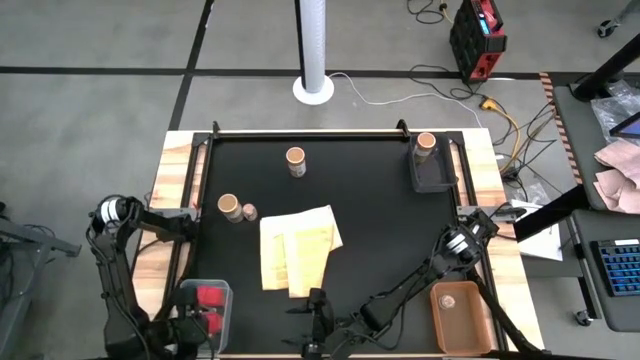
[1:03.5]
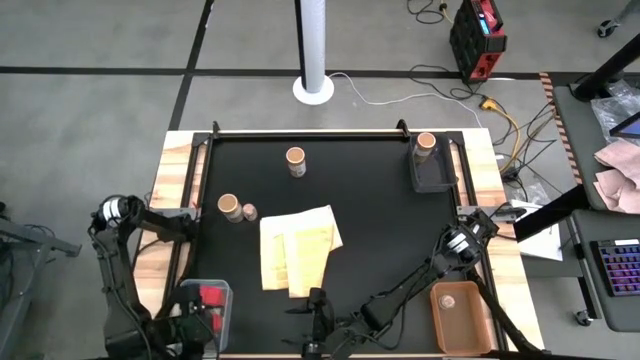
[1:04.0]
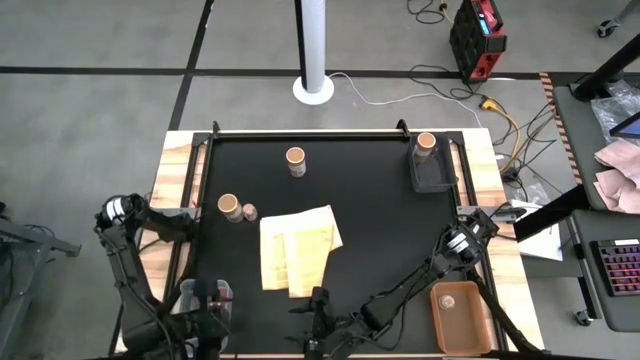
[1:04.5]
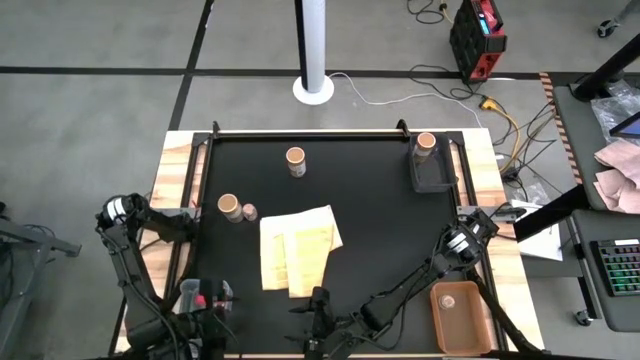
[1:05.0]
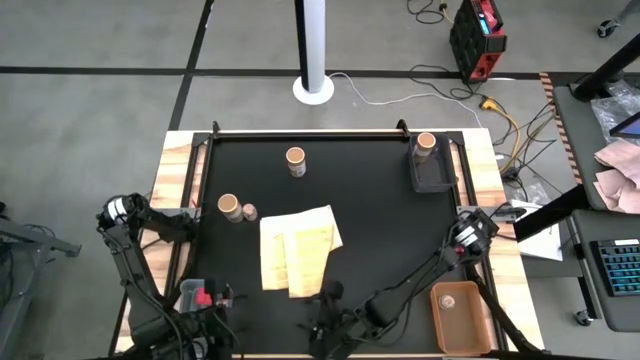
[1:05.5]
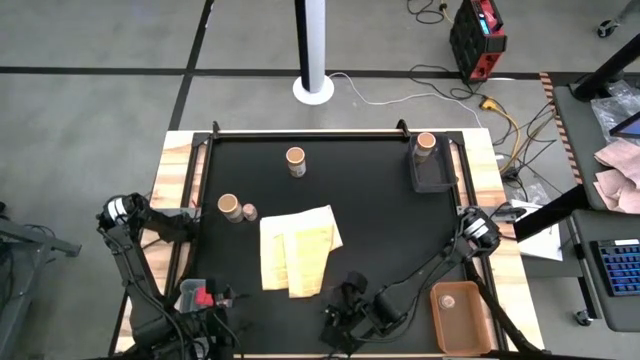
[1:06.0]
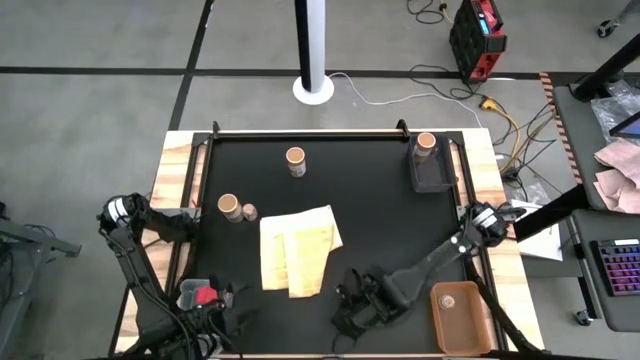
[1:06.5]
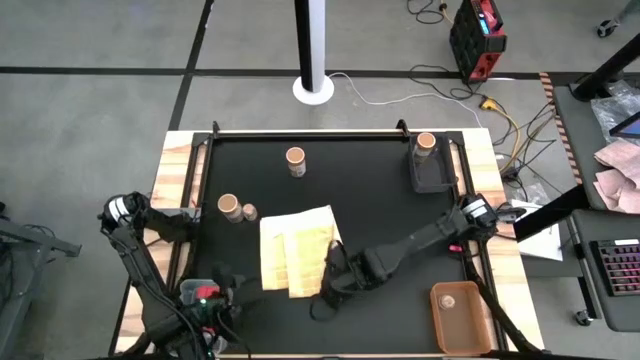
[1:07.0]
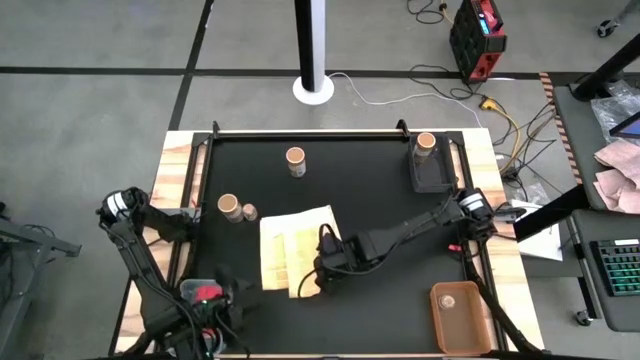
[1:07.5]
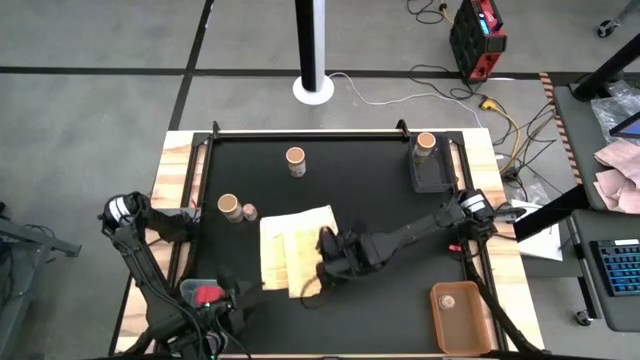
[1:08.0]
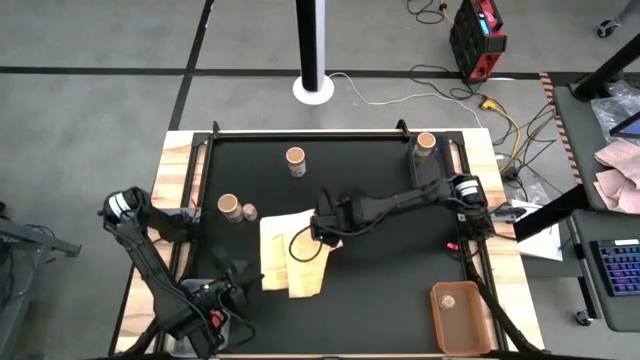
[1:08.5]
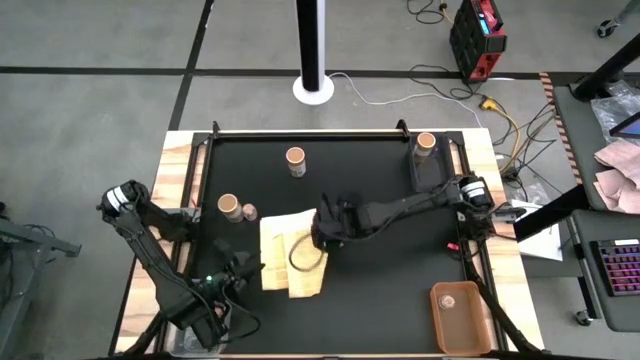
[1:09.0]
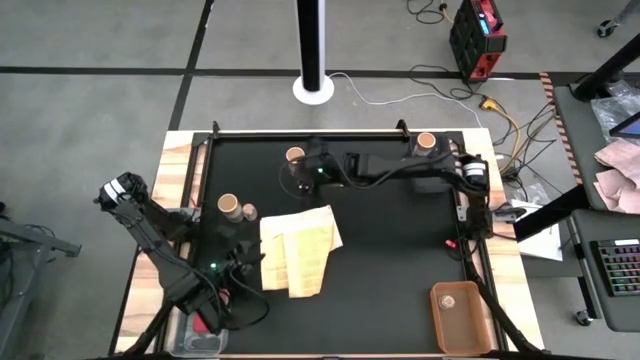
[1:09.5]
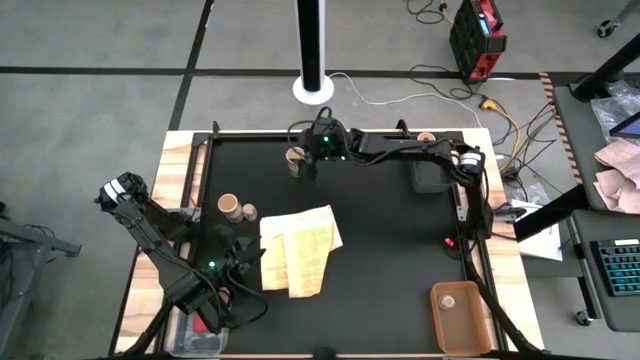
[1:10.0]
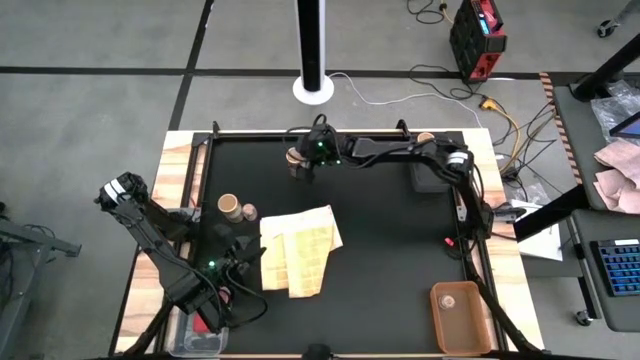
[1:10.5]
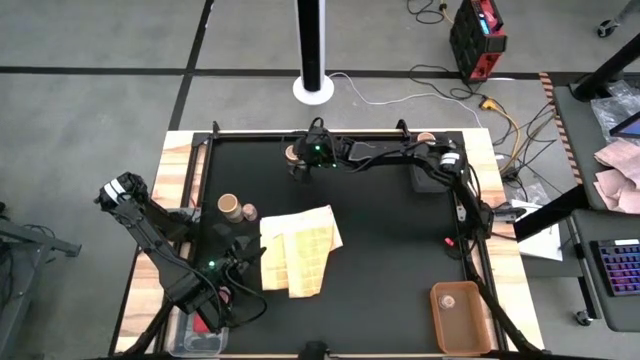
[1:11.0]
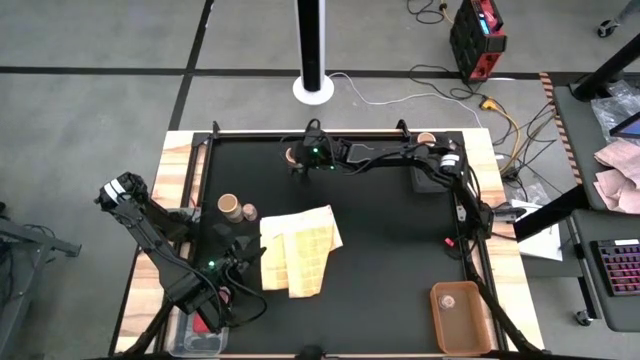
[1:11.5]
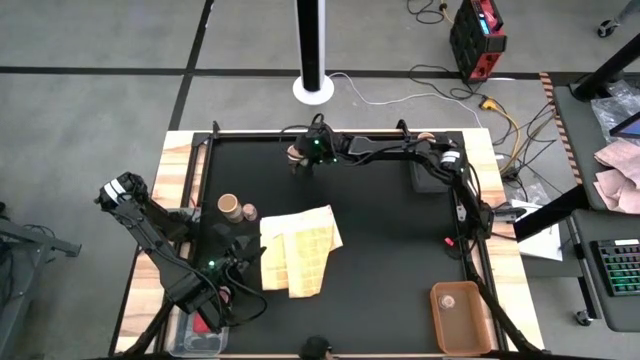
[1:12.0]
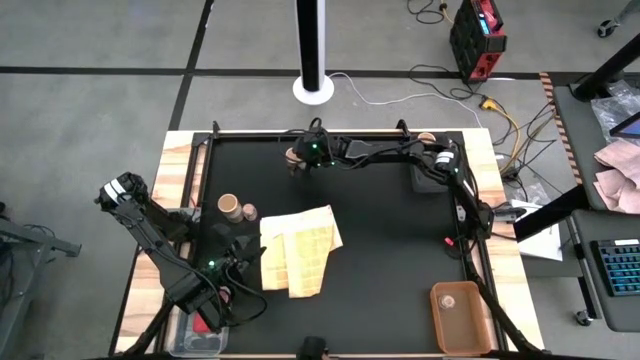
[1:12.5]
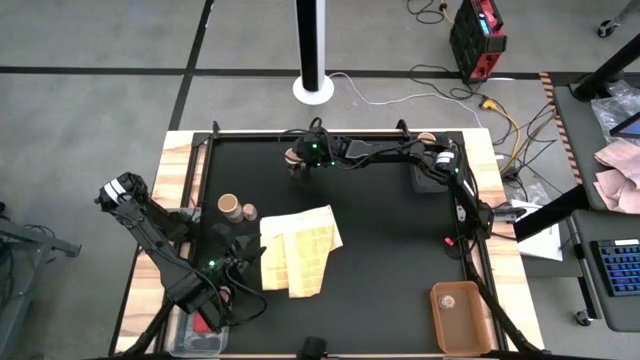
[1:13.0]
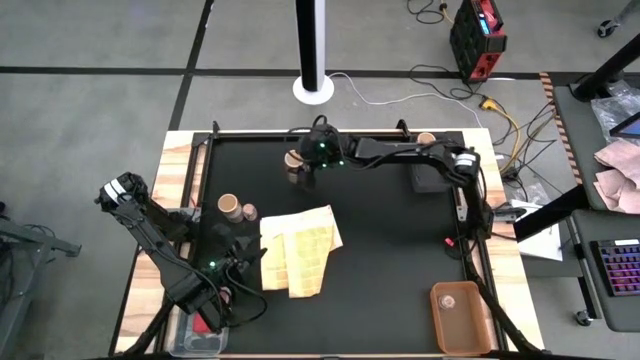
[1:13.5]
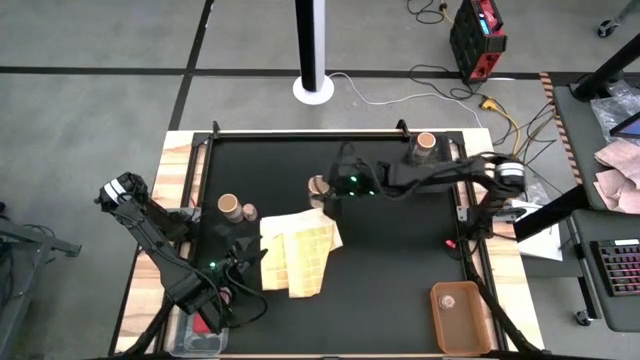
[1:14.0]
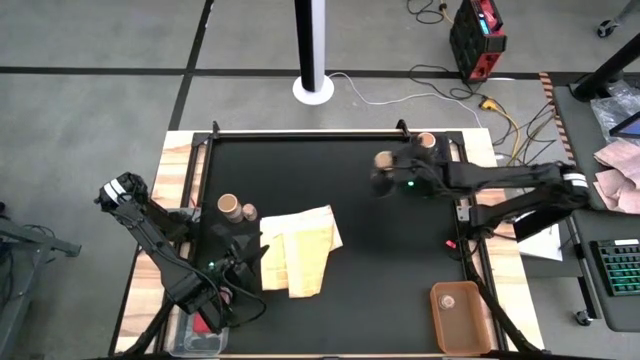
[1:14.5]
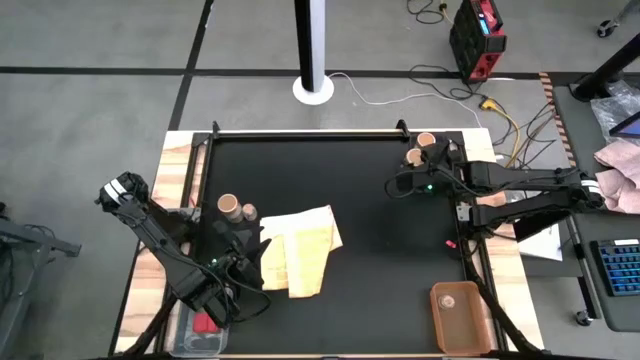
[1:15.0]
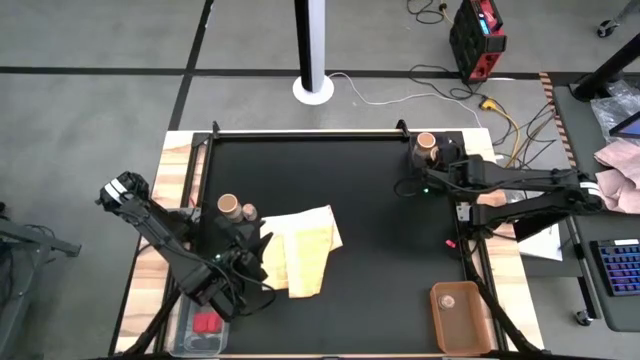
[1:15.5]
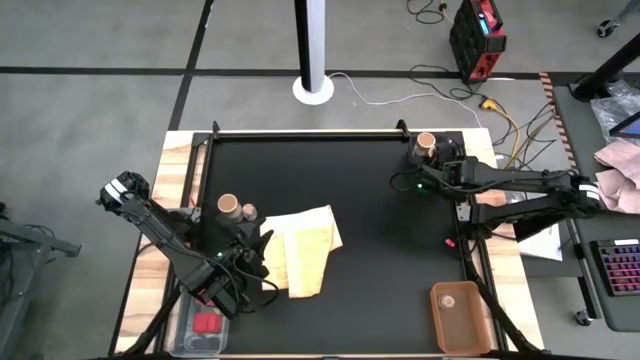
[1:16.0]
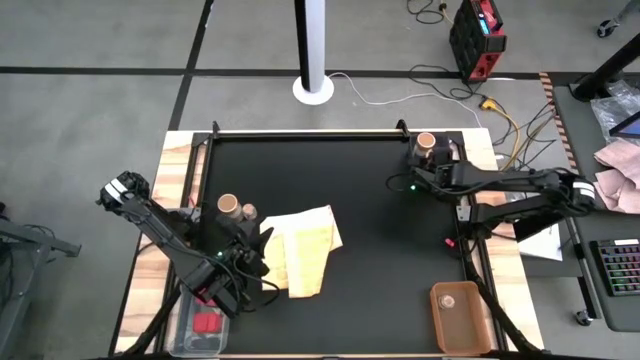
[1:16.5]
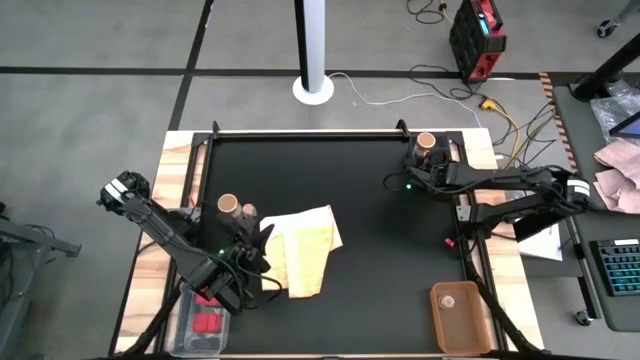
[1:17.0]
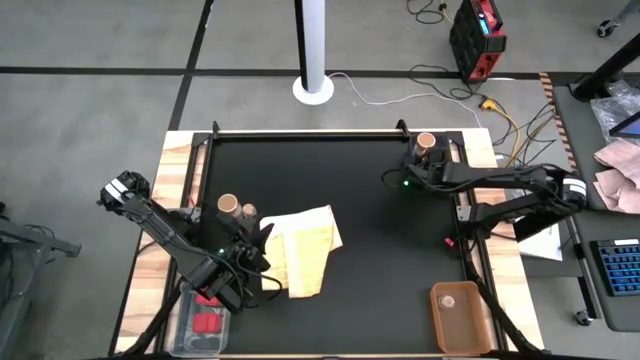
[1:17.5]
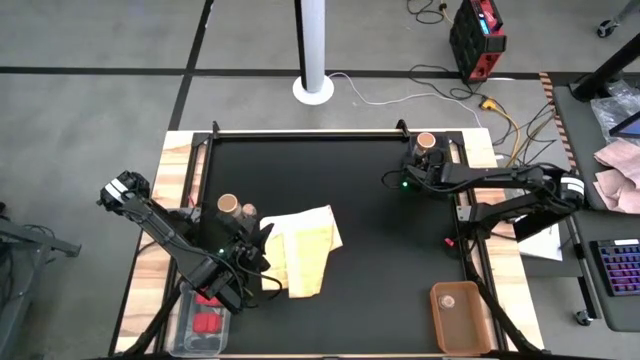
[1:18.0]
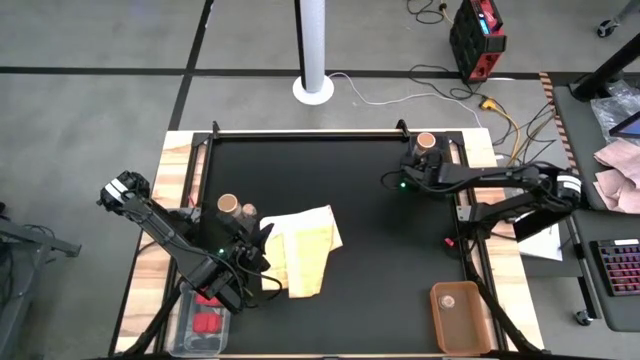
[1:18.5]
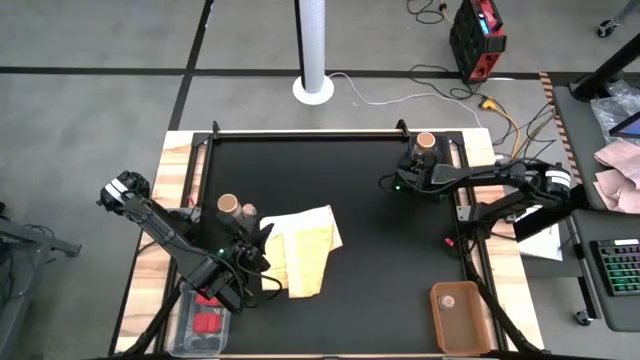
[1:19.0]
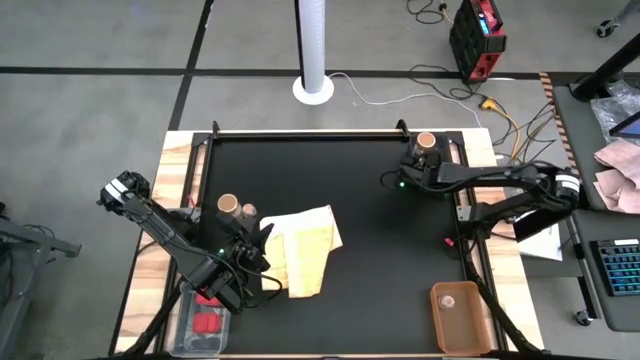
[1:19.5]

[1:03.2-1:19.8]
Task: Sort spices by type
Put the top golden spice bottle into black bin

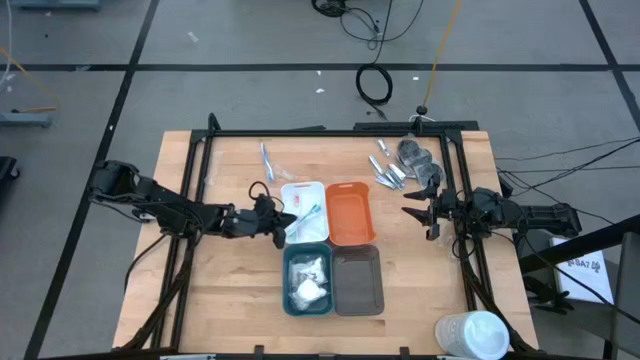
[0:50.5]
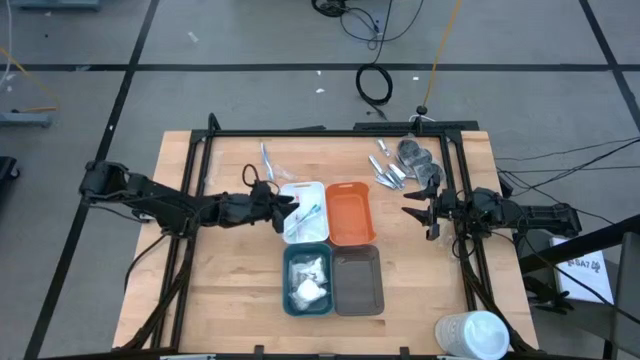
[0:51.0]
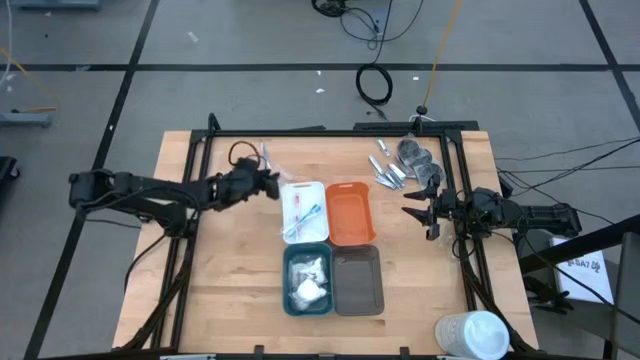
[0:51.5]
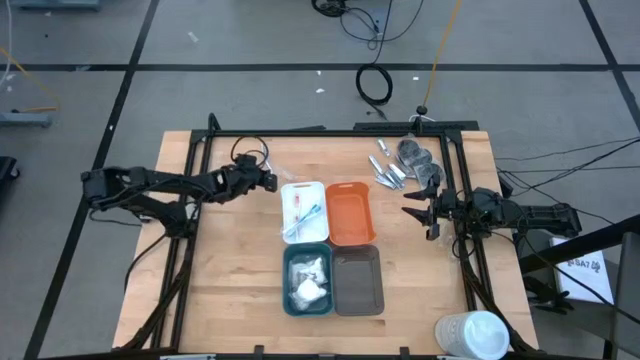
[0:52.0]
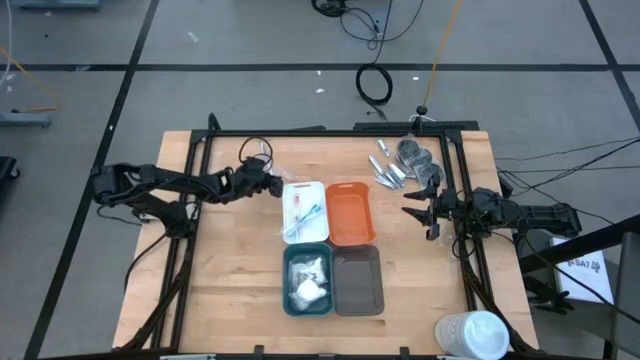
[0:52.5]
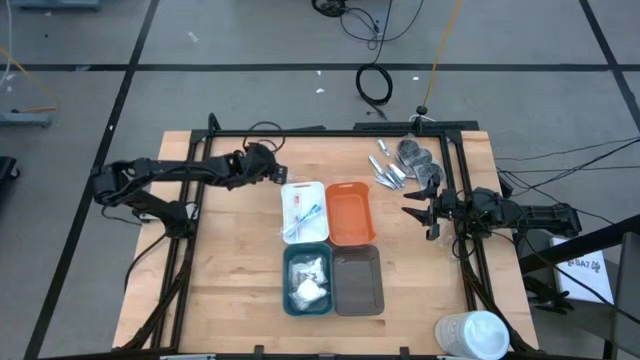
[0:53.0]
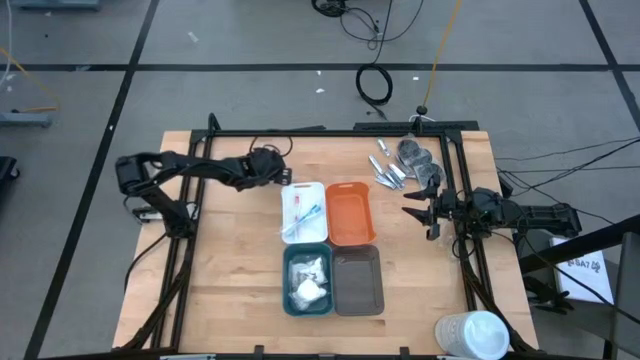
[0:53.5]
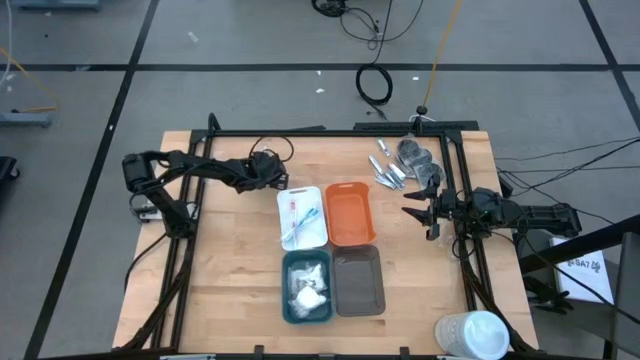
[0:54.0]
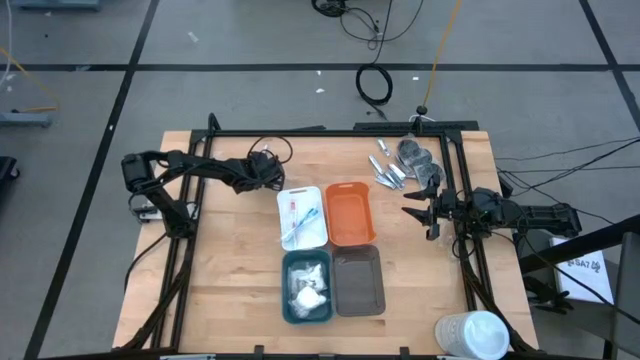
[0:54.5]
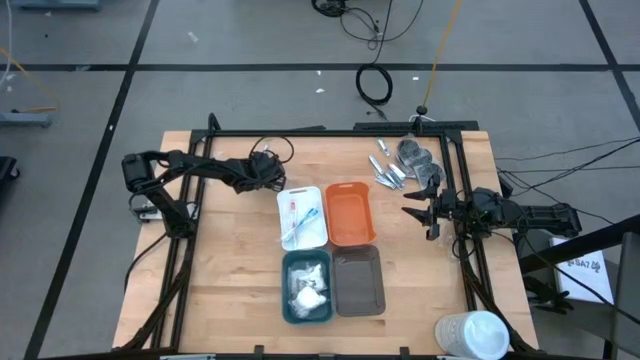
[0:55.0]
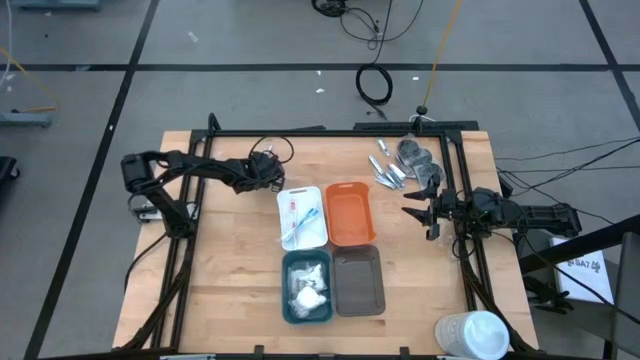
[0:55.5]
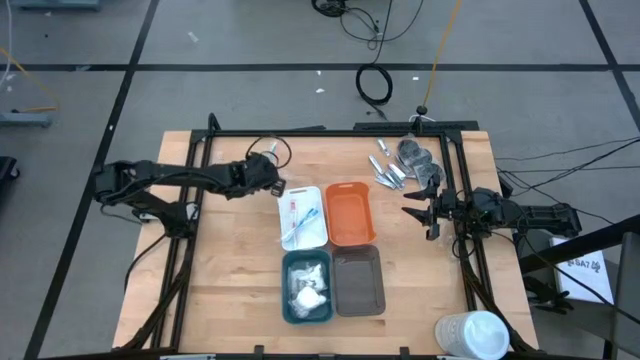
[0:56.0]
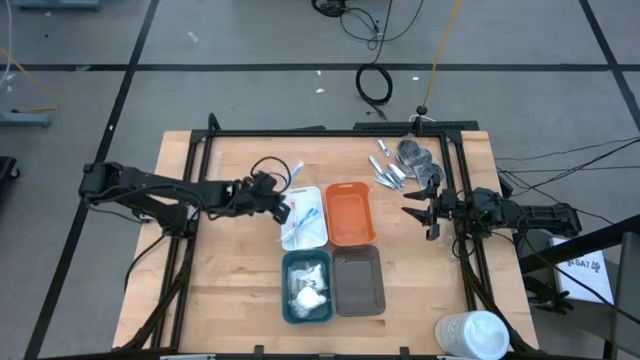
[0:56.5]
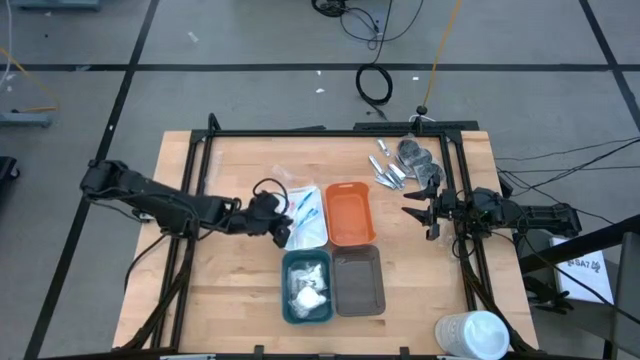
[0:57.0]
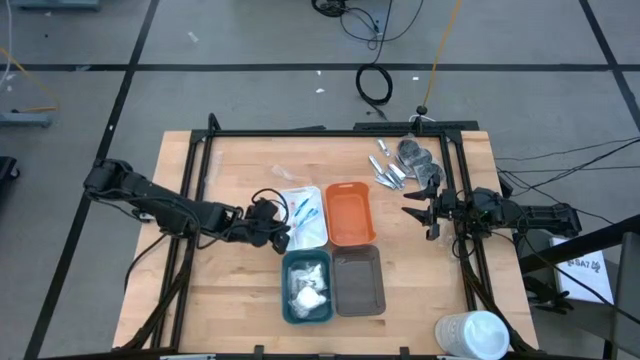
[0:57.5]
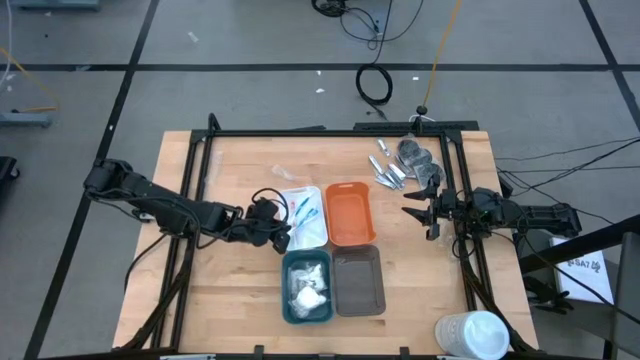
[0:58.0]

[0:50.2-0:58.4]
Task: Pick & Place Travel size toiletries
Put the blue toothbrush into the white bin
